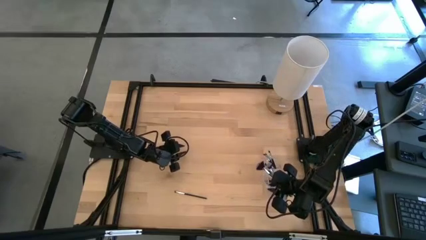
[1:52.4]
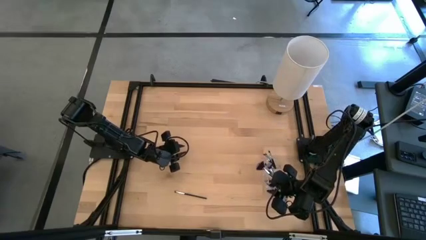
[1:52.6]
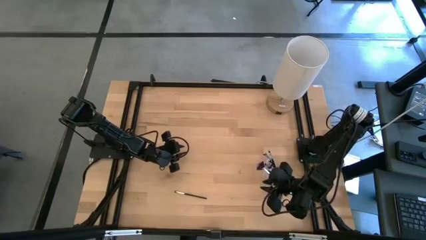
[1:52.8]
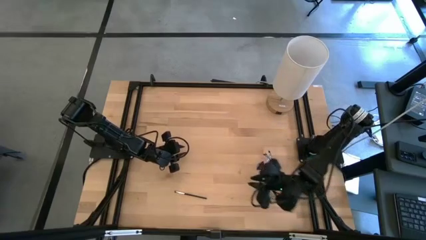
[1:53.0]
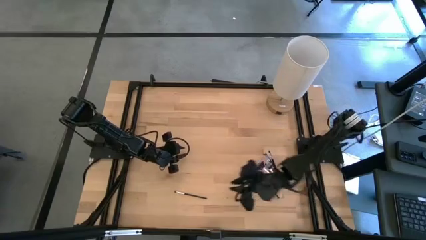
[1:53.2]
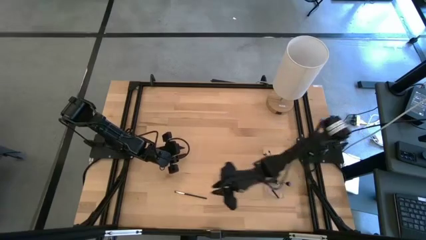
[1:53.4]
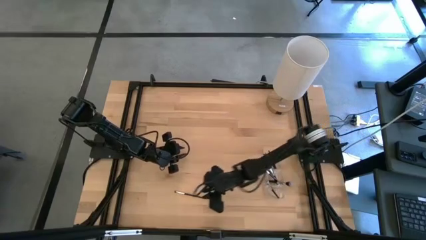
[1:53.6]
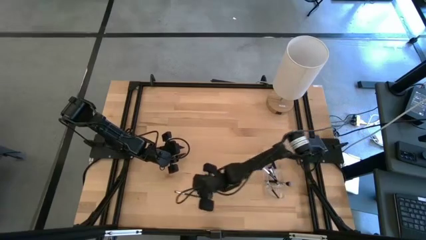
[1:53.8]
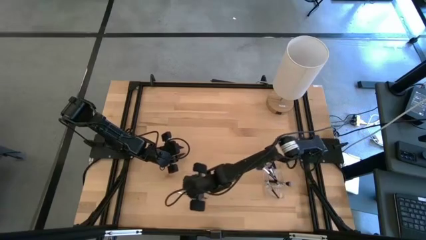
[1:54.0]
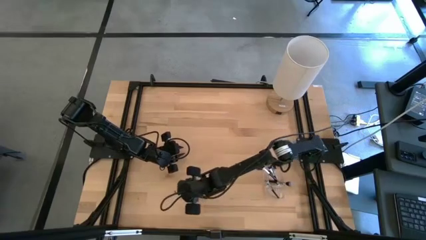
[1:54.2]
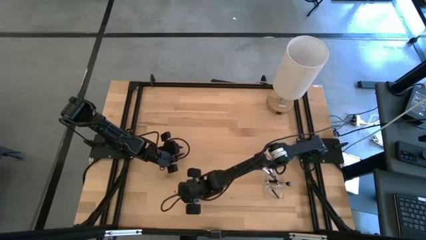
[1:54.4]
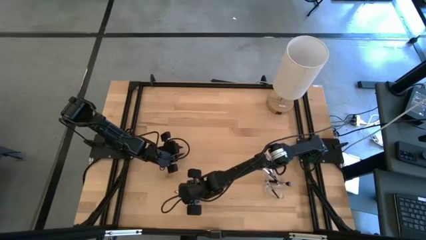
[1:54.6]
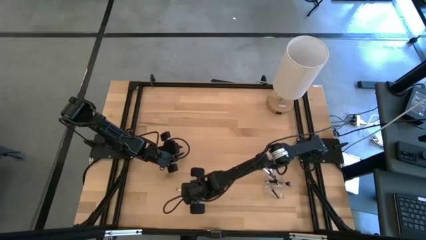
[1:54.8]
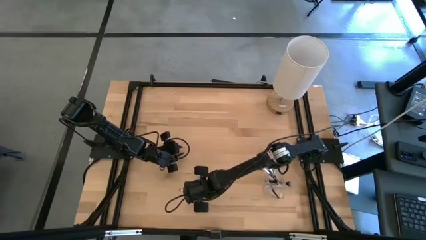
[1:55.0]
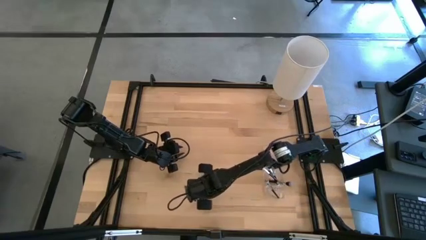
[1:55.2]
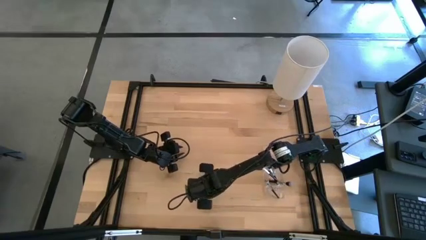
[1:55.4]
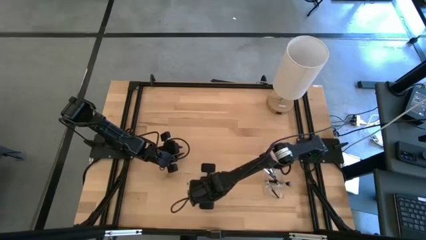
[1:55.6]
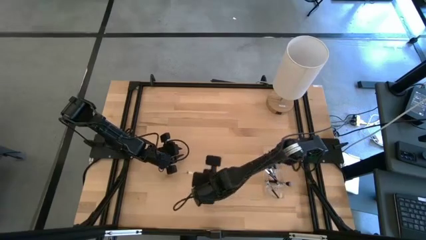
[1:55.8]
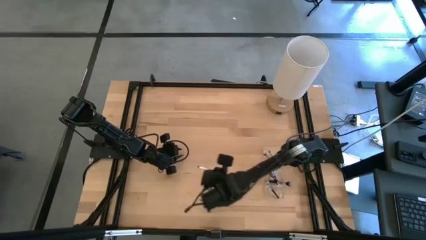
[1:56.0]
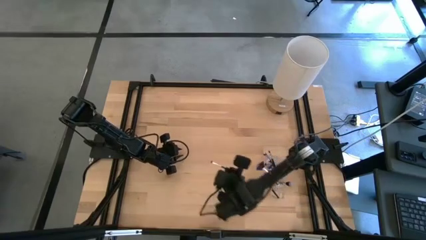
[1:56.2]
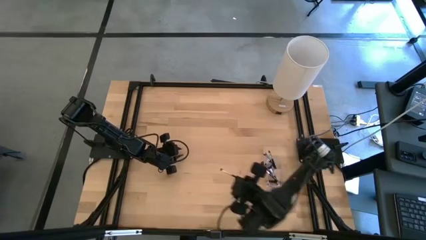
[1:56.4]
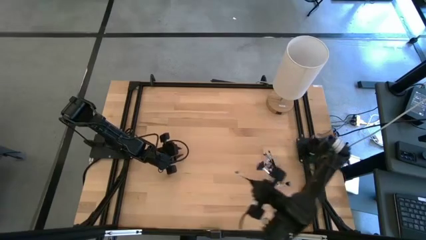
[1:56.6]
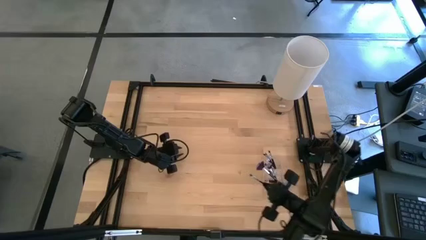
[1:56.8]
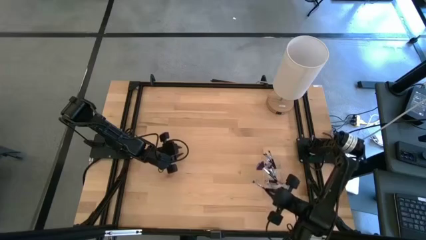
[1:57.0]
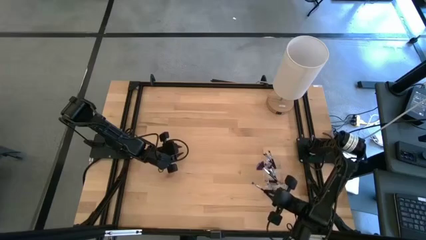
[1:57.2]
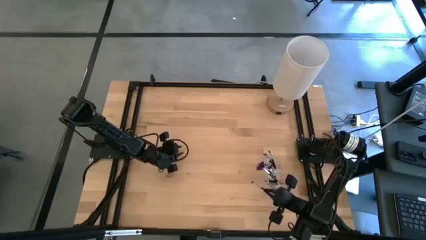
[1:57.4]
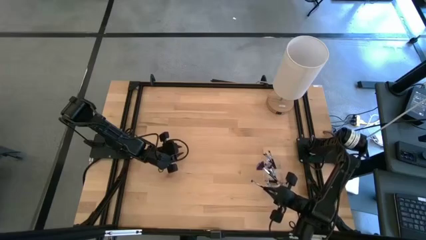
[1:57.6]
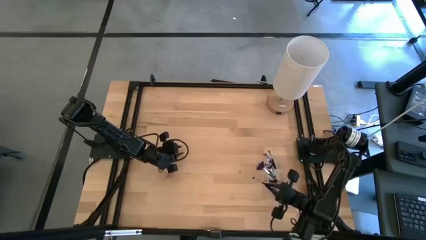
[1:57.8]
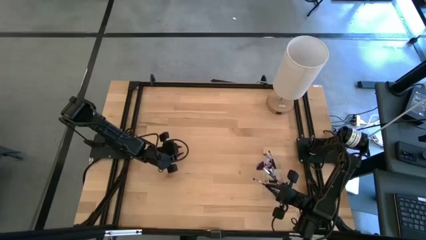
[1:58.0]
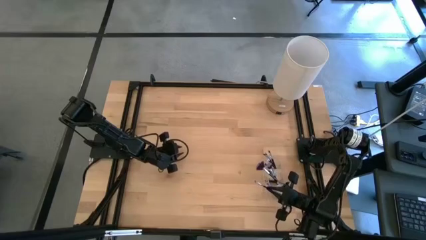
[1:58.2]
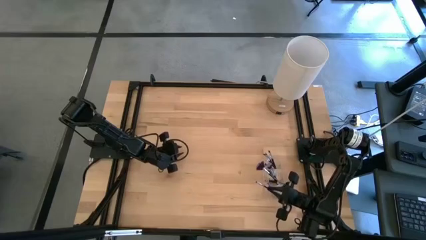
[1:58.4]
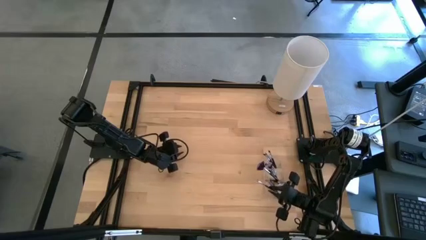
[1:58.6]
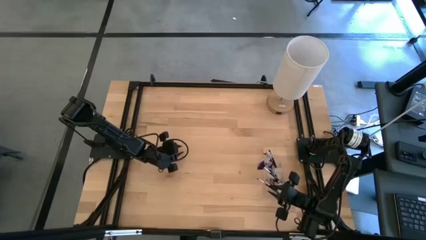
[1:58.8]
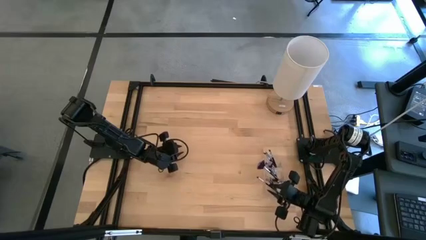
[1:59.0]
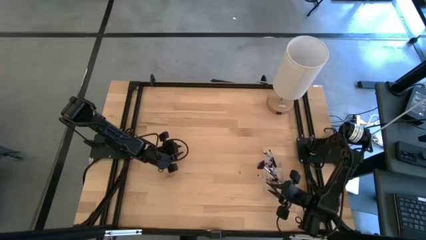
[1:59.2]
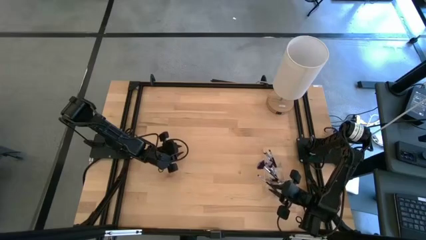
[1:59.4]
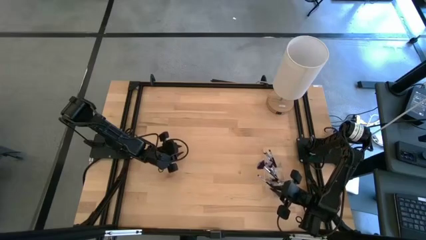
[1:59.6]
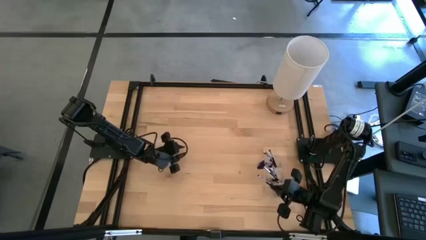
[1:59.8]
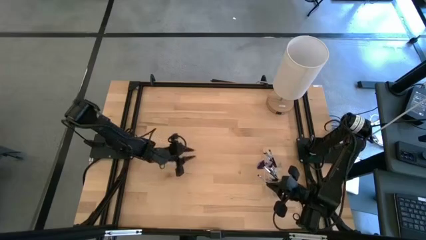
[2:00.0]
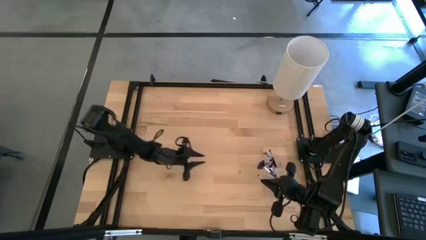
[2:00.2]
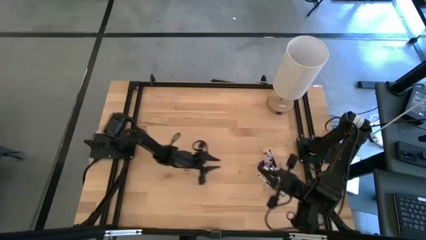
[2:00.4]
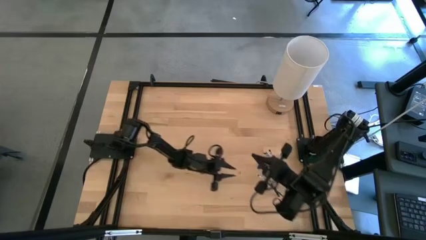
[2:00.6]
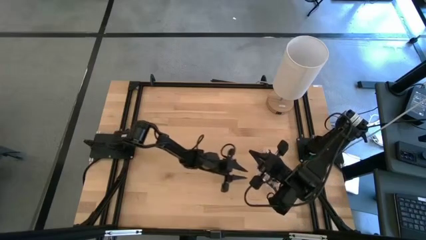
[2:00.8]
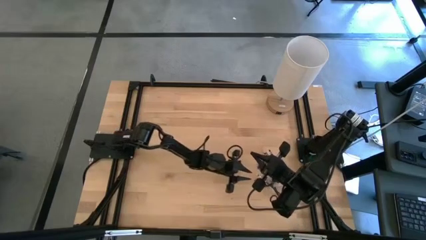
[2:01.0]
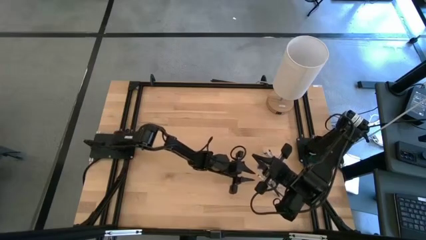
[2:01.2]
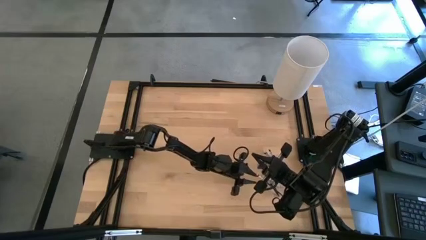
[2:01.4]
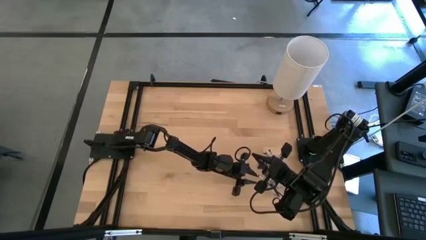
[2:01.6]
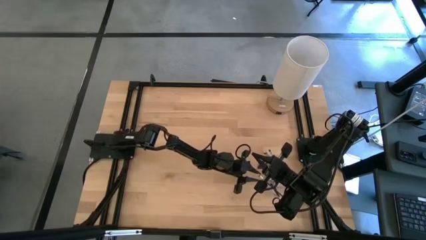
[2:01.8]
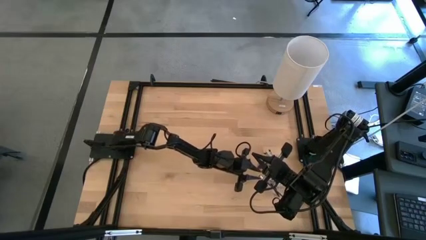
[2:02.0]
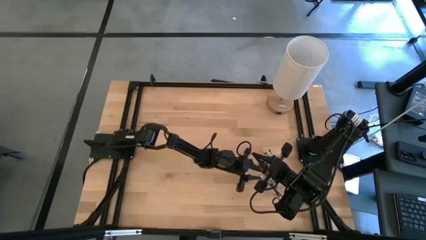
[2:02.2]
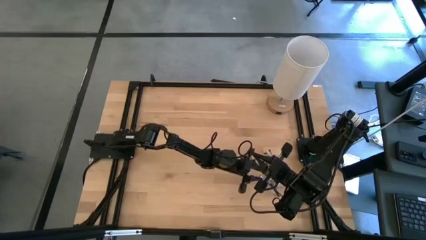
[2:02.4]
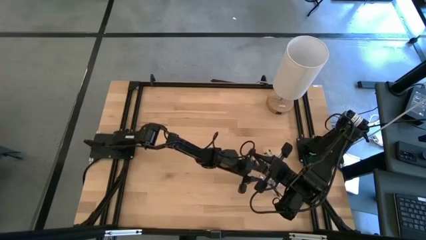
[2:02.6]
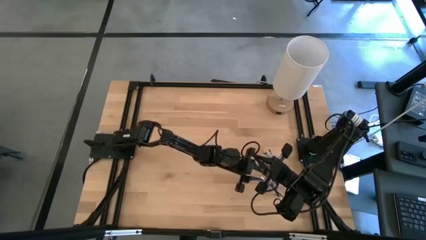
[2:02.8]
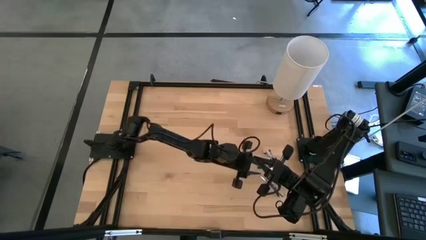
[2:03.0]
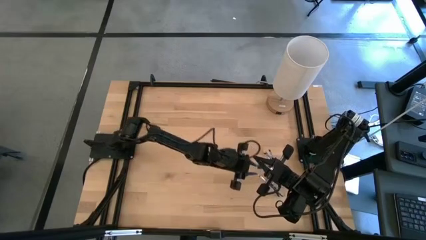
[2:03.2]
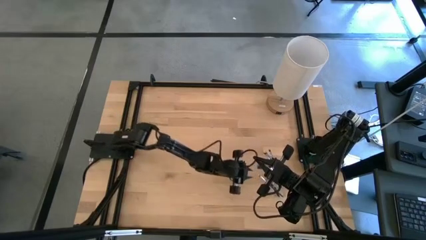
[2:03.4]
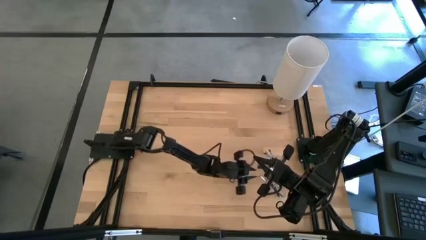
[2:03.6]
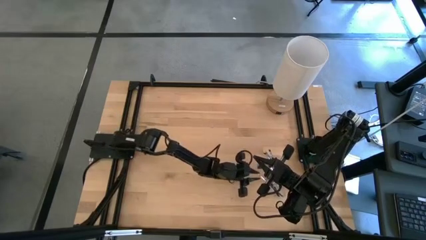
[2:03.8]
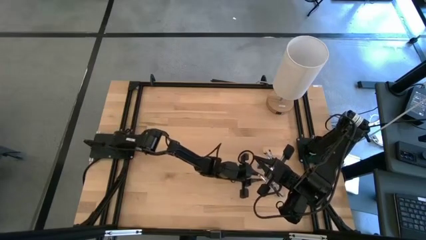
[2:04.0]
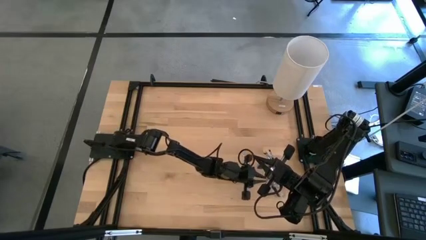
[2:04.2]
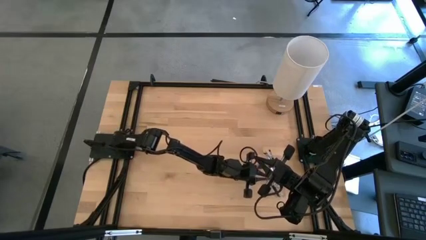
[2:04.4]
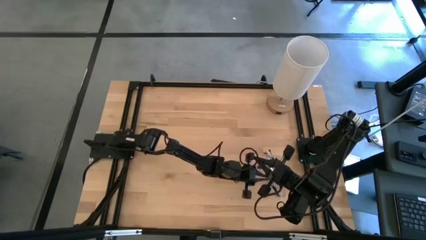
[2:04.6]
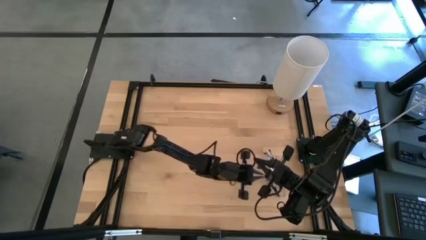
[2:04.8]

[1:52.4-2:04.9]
Task: Put items in baskets/containers
Put the foundation brush into the right section of the transparent organizer
